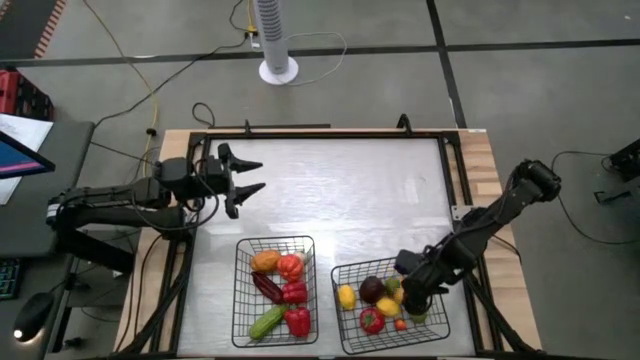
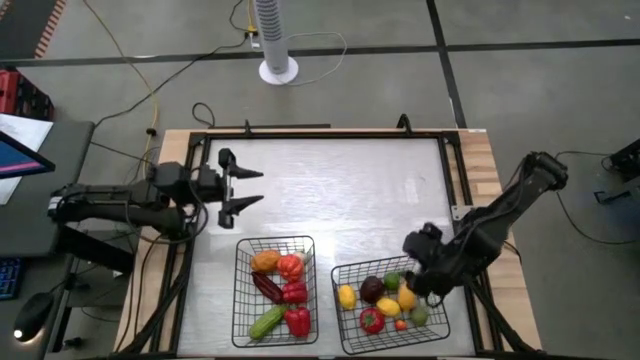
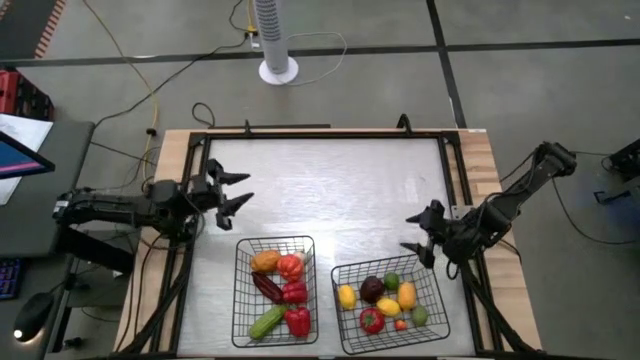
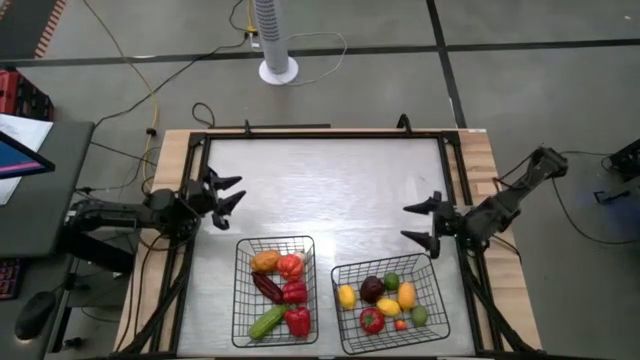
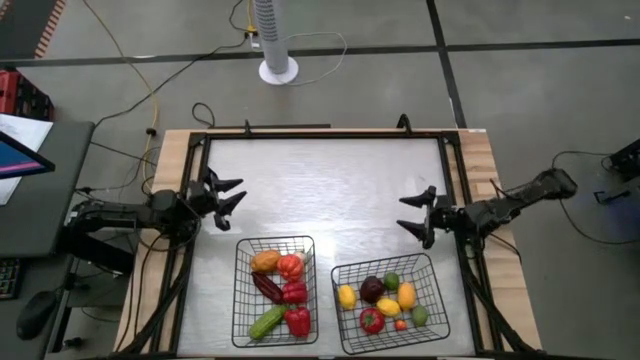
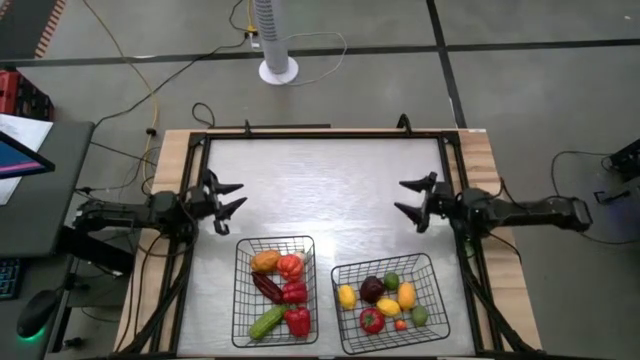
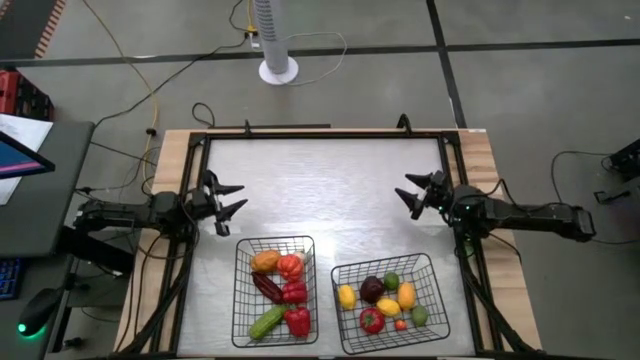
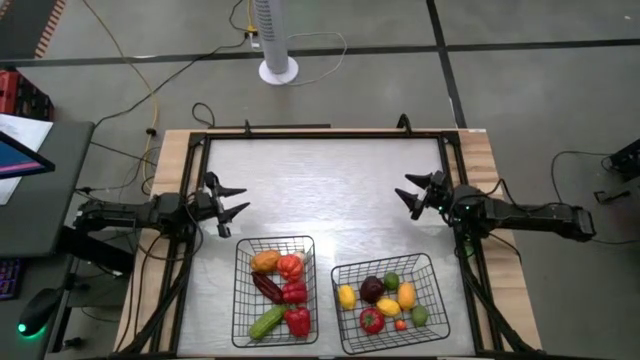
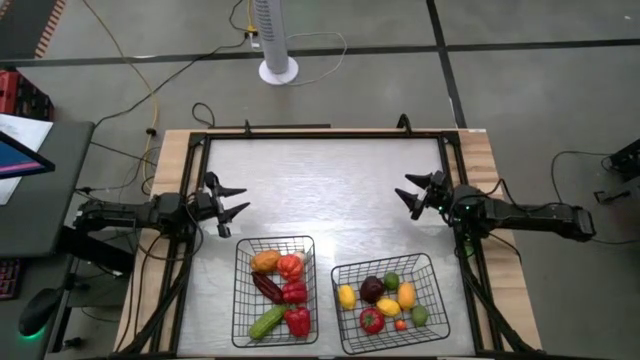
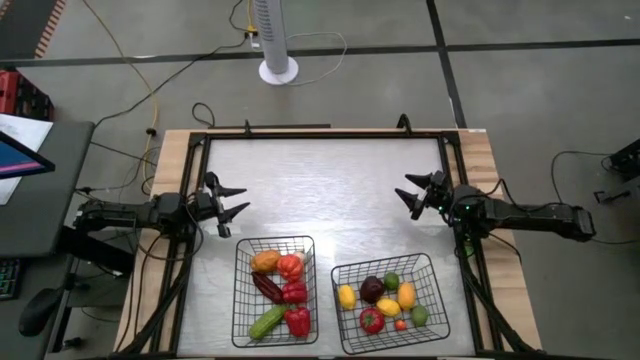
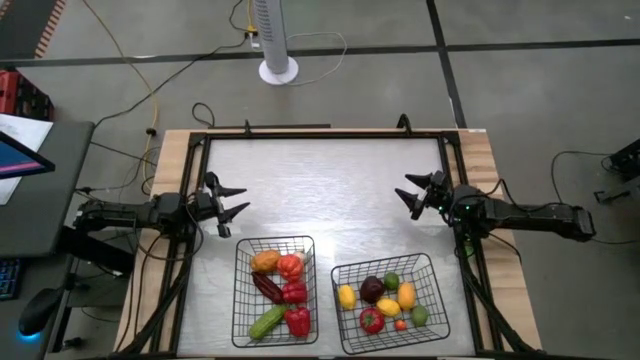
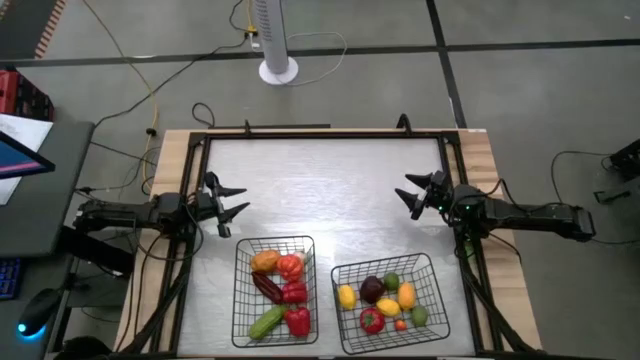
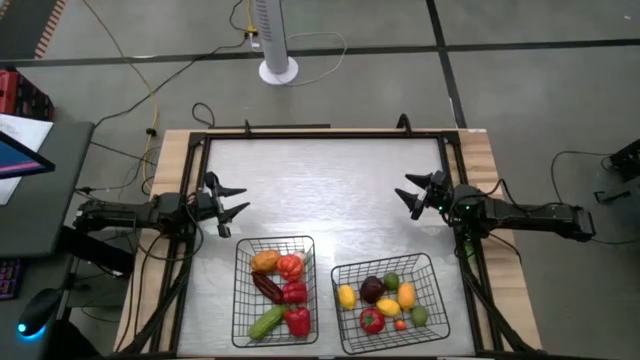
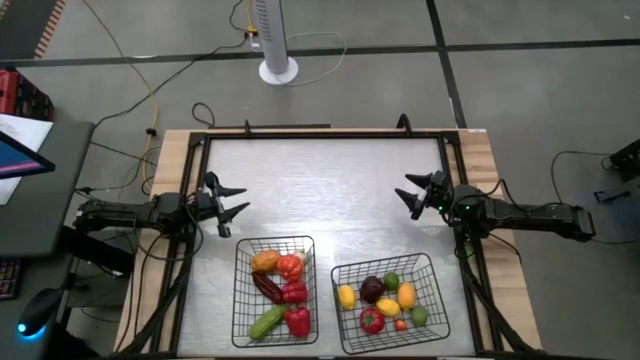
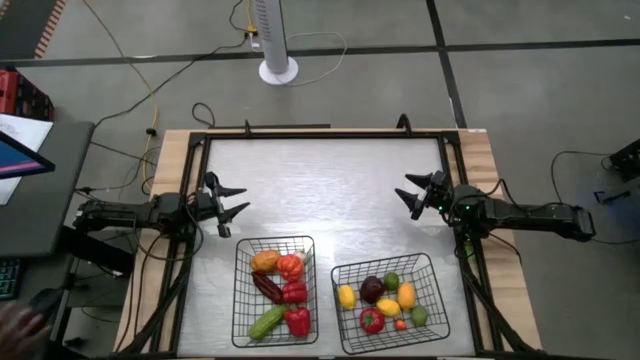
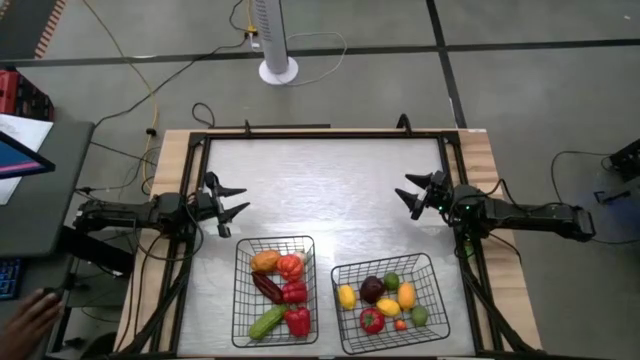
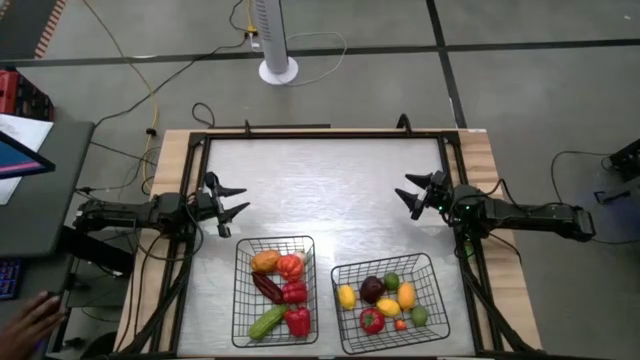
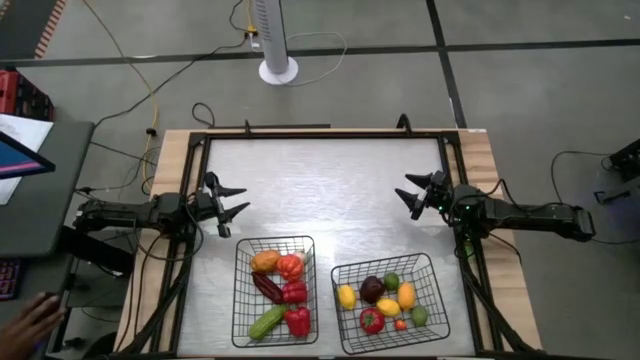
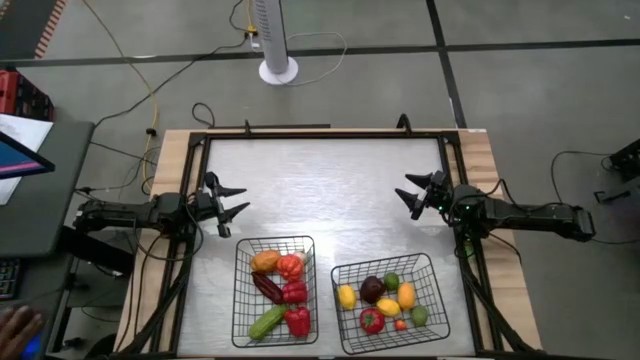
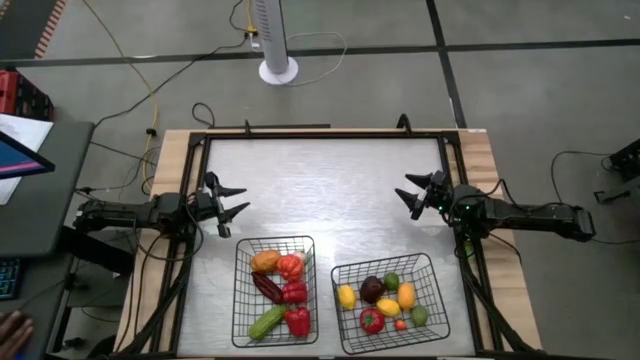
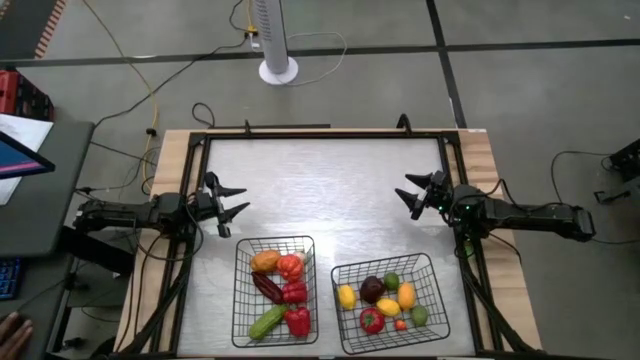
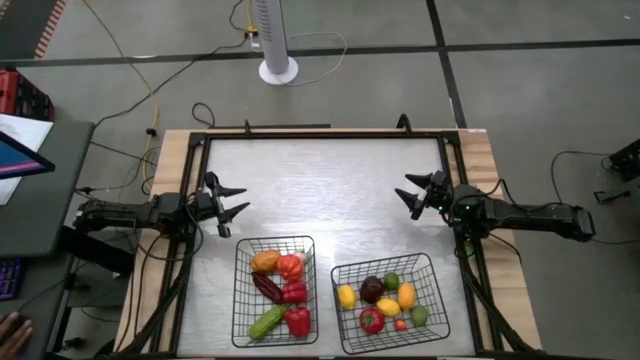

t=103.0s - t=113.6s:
Task: Sort produce into baskets
Return to Home Position

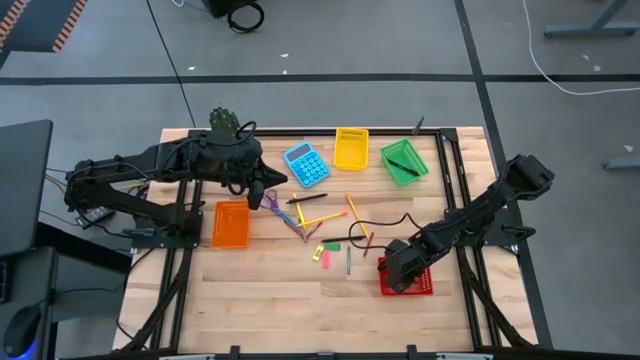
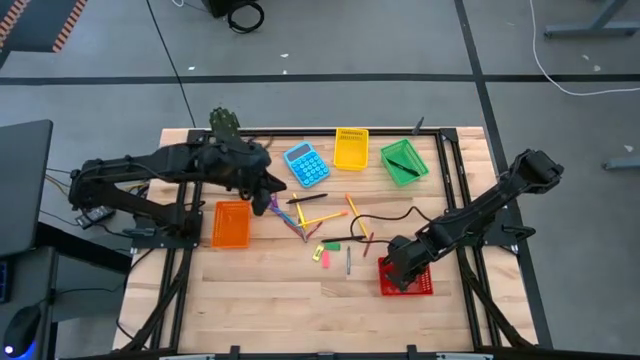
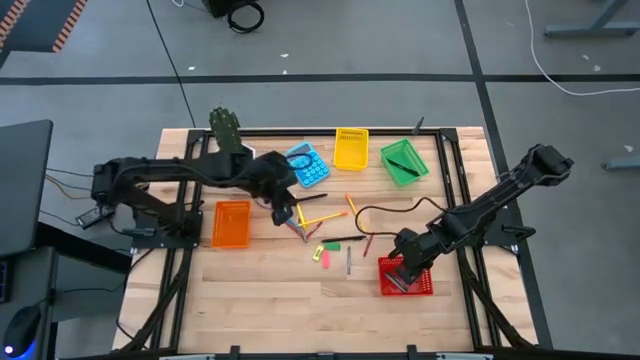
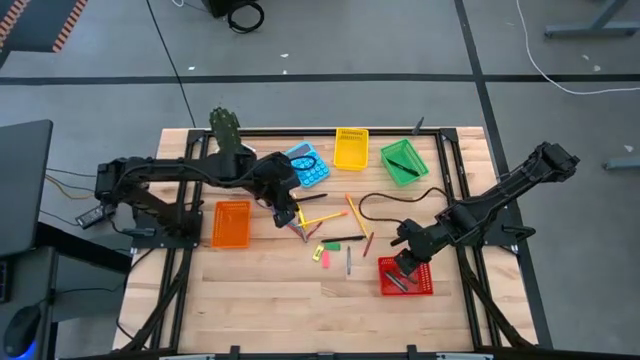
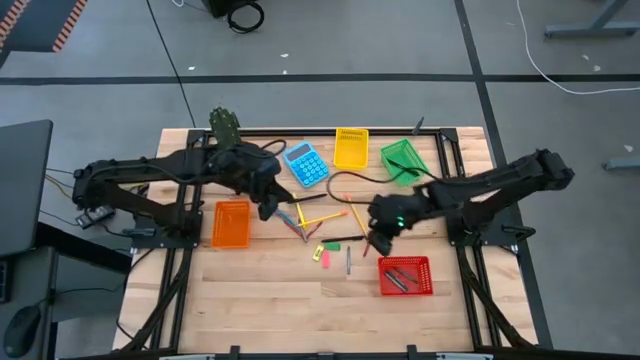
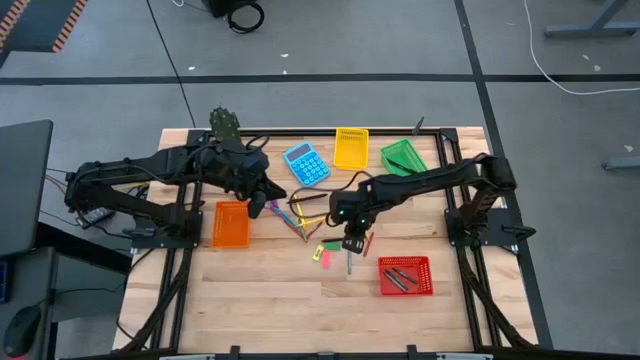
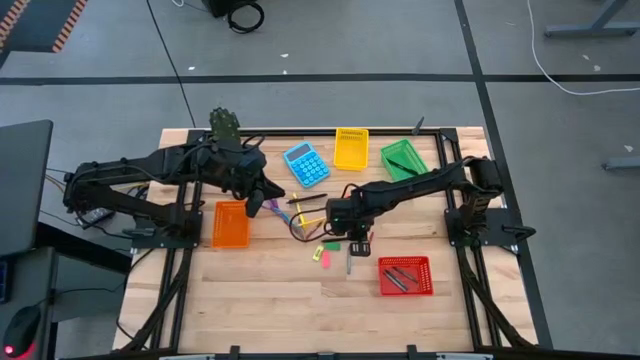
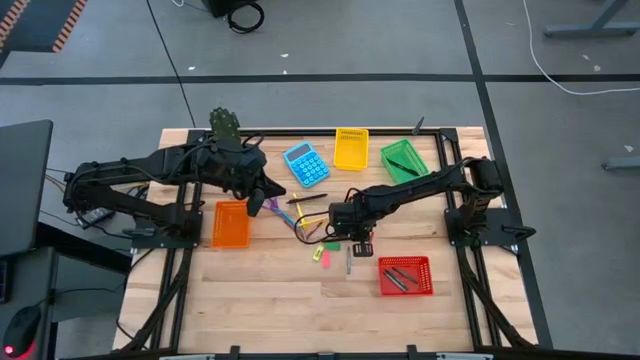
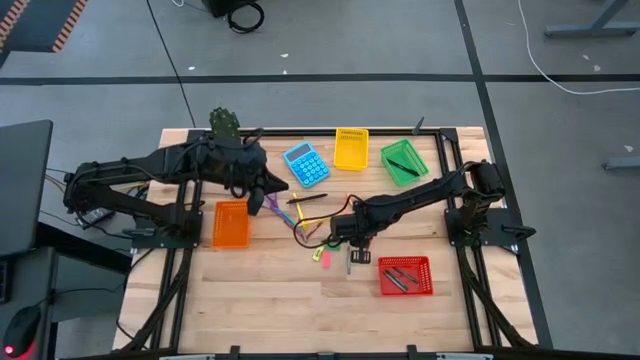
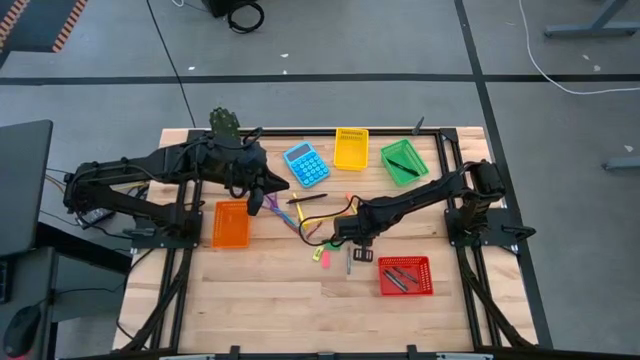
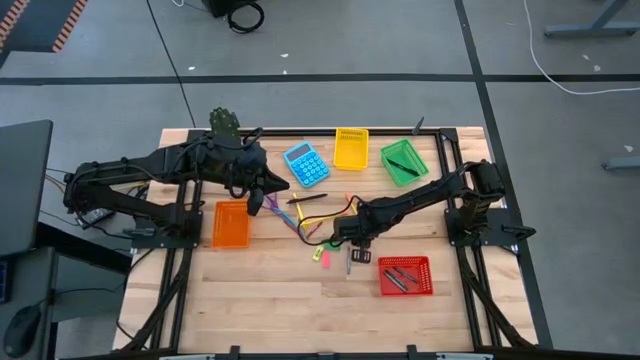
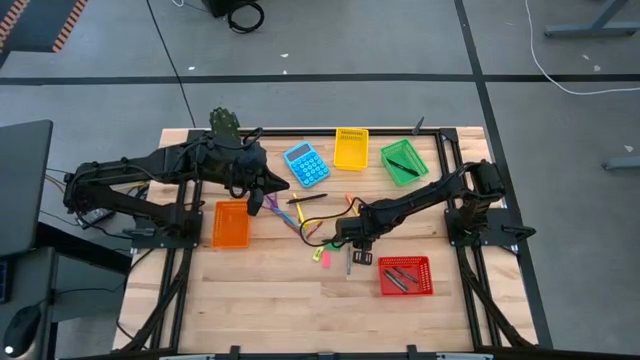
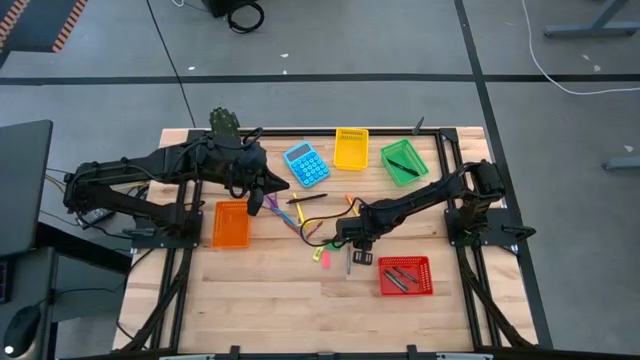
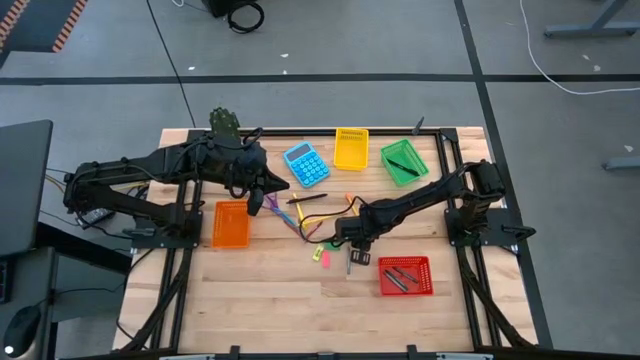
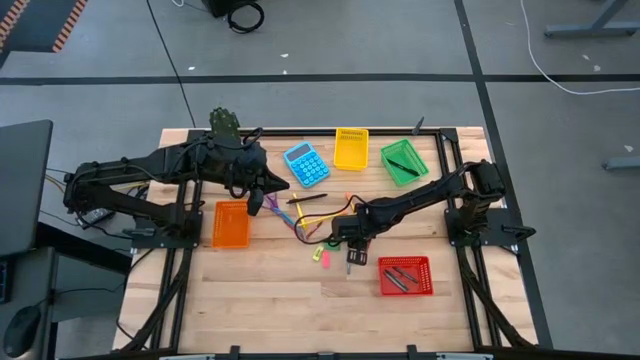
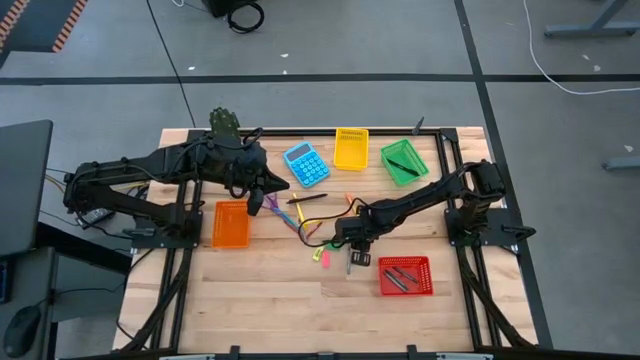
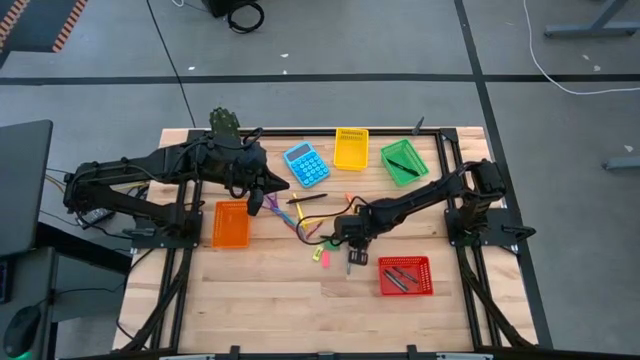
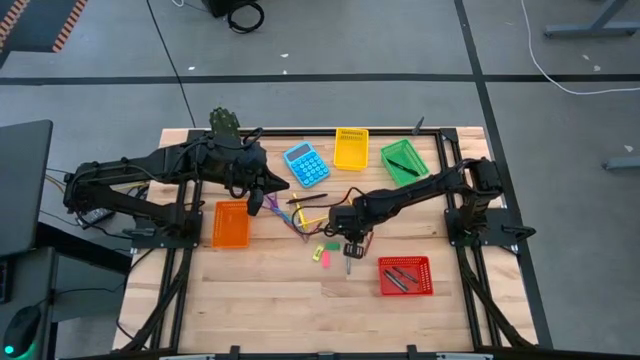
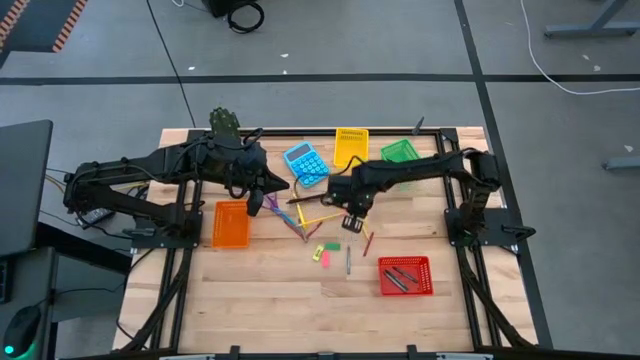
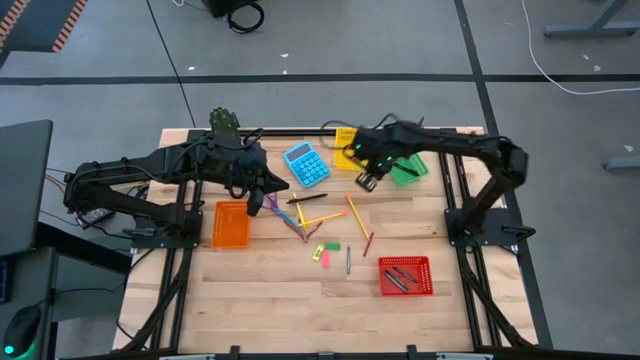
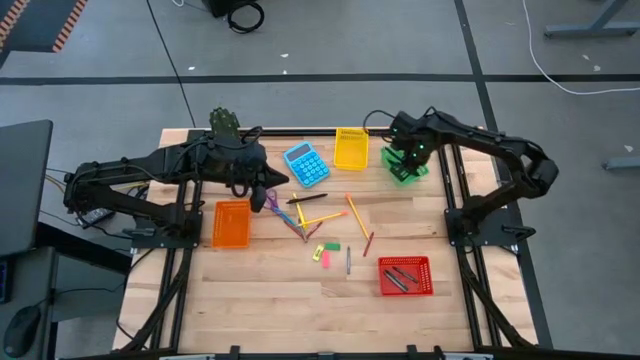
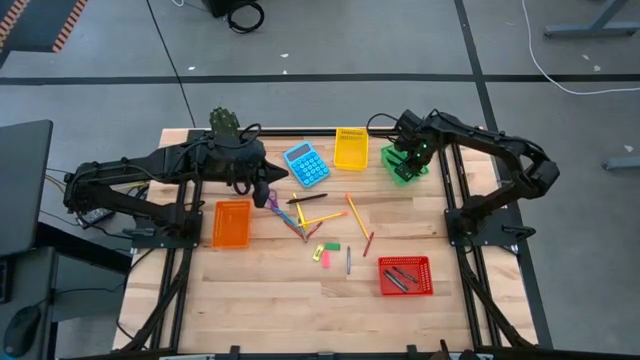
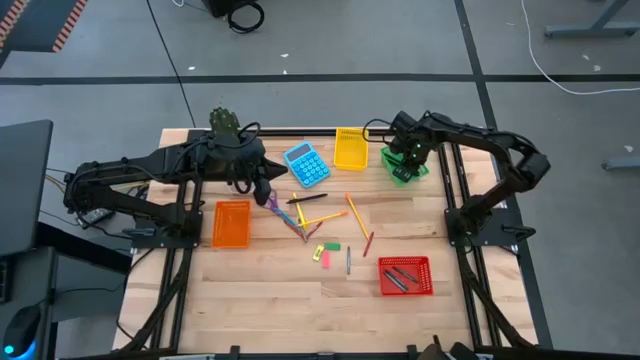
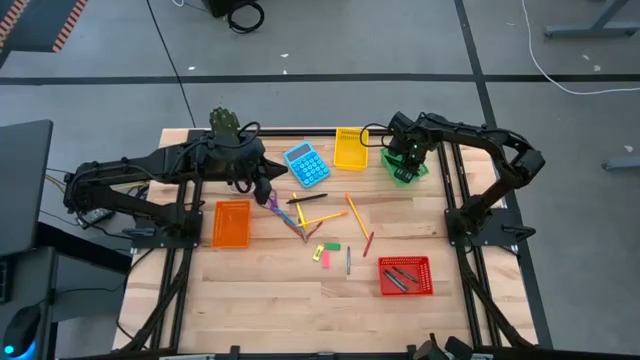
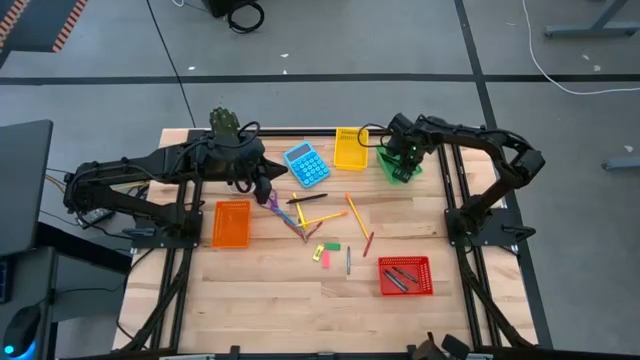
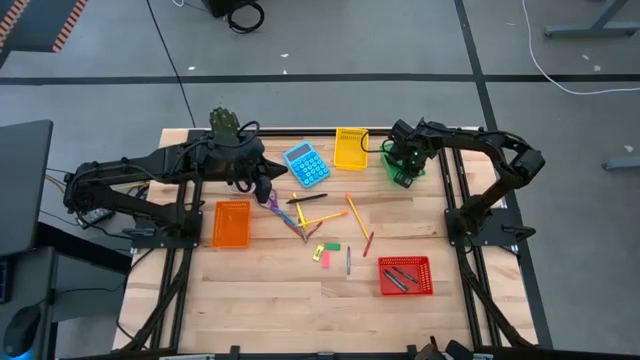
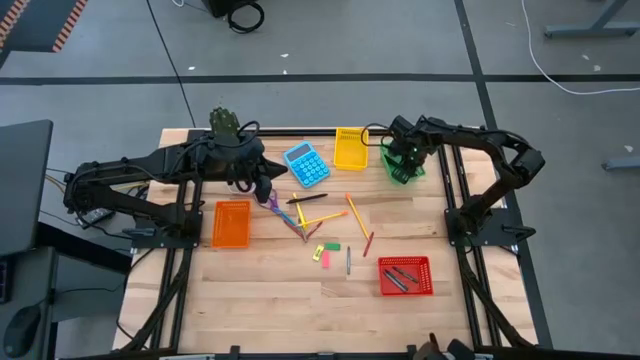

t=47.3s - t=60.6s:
Task: Sort crayons/erasers/pens/pencils in bins
Put the bottom black pen into the green bin
